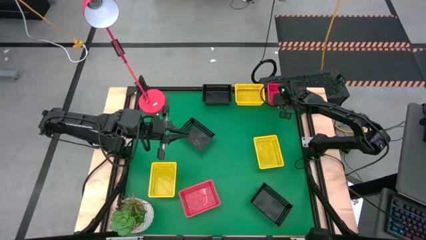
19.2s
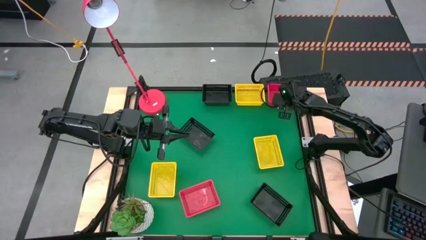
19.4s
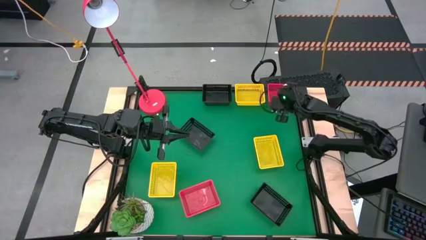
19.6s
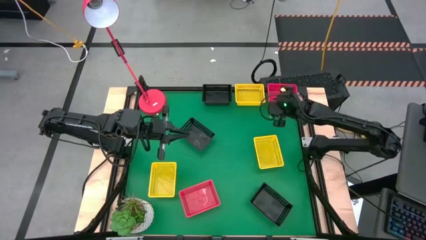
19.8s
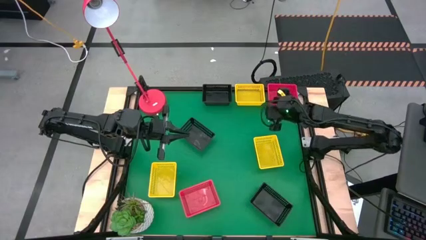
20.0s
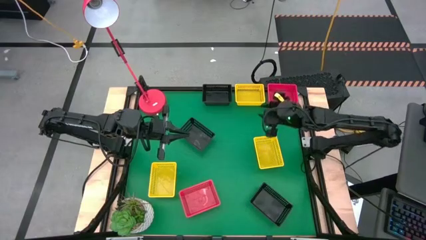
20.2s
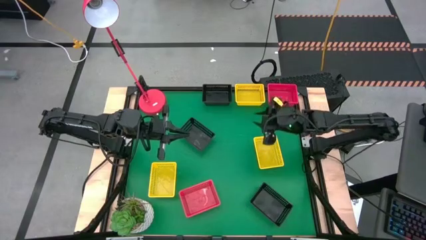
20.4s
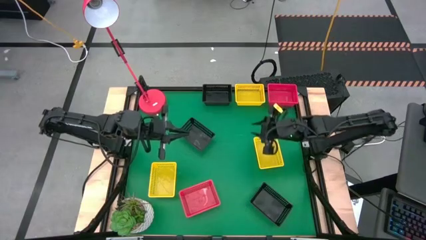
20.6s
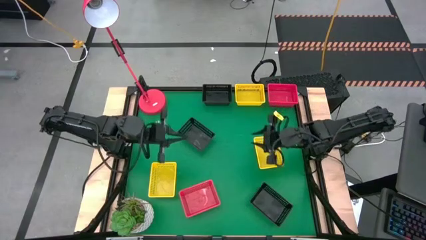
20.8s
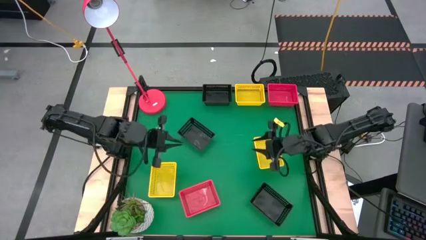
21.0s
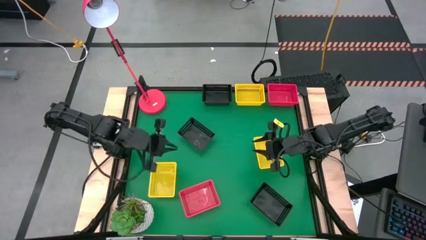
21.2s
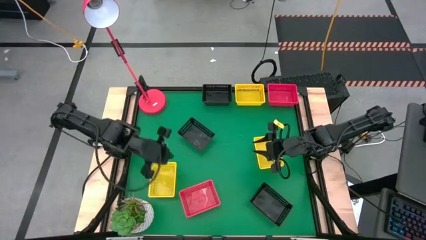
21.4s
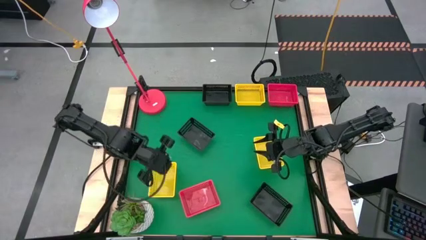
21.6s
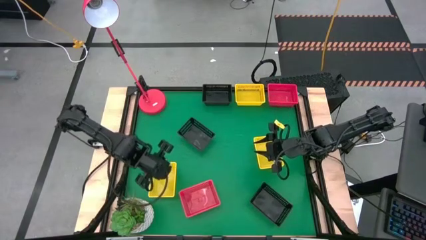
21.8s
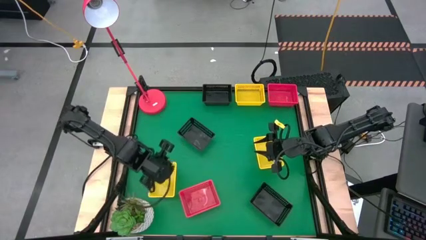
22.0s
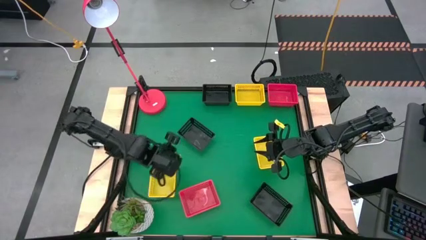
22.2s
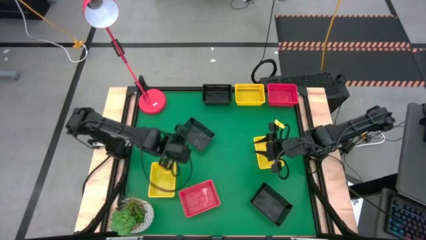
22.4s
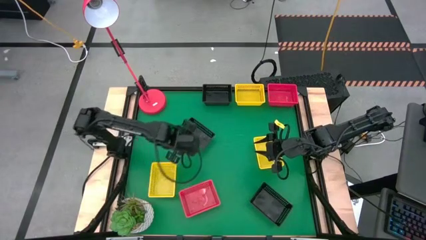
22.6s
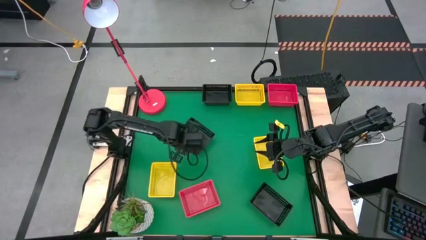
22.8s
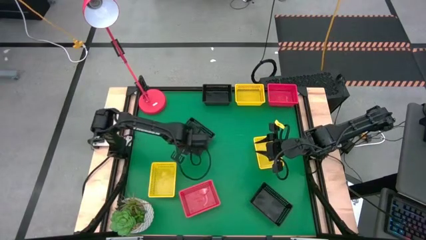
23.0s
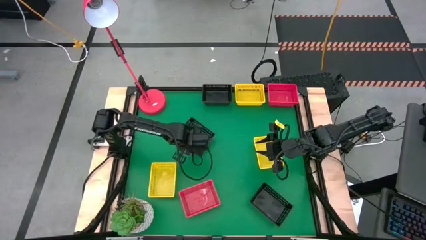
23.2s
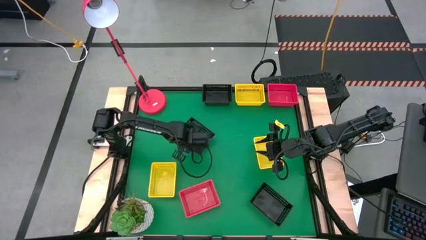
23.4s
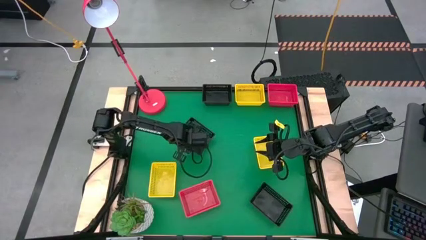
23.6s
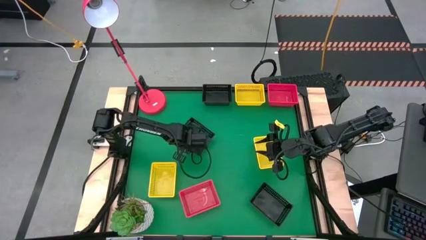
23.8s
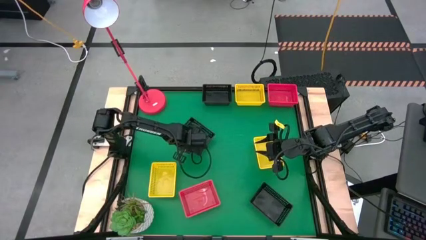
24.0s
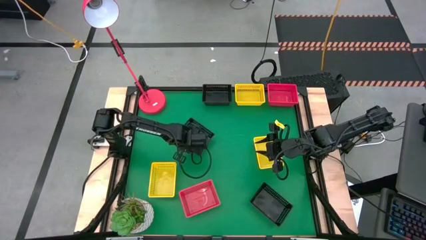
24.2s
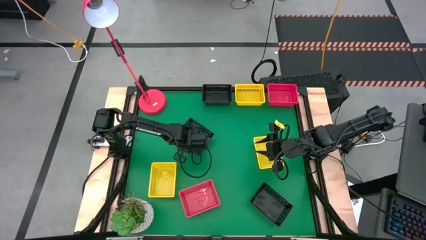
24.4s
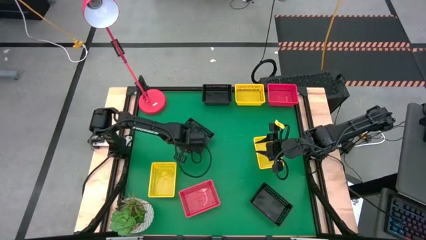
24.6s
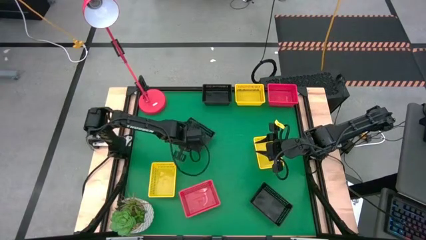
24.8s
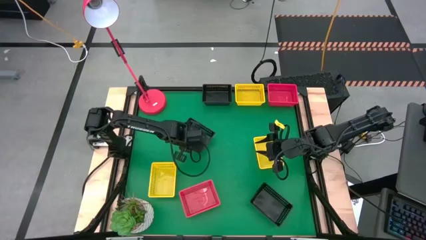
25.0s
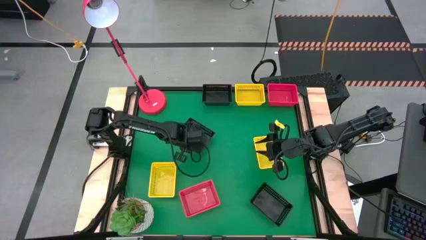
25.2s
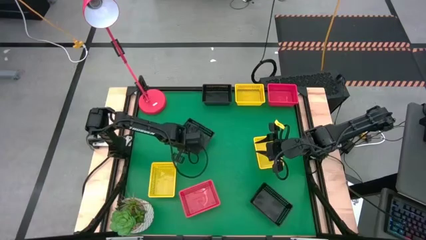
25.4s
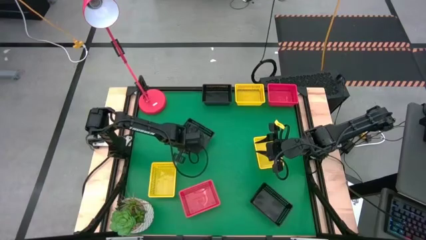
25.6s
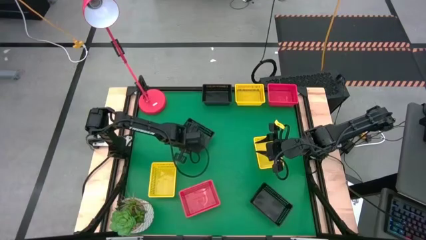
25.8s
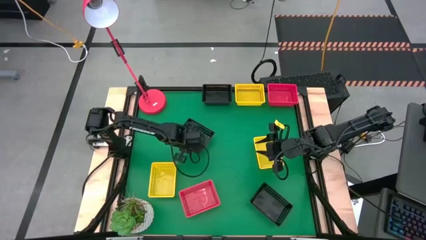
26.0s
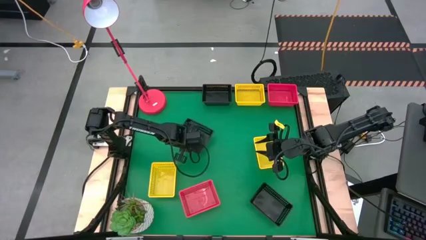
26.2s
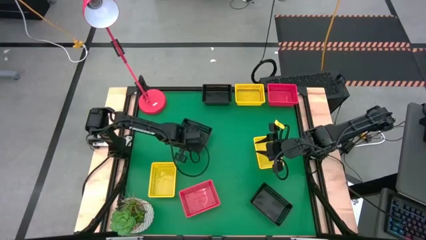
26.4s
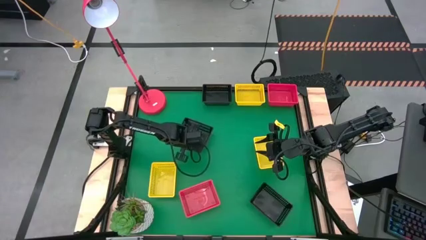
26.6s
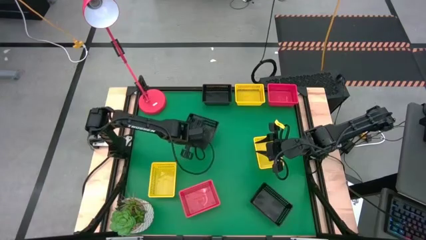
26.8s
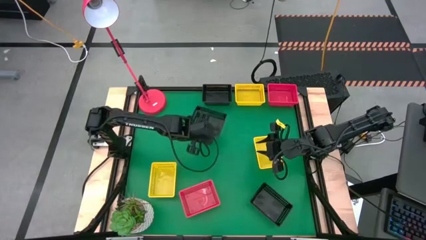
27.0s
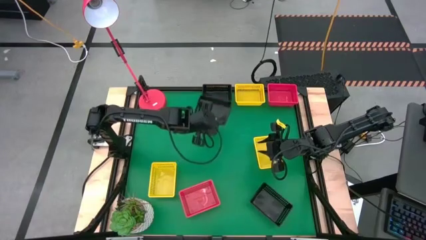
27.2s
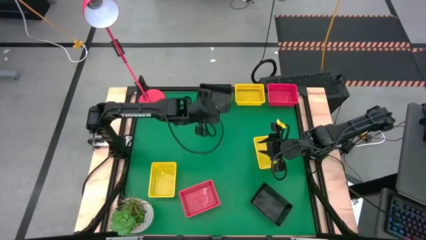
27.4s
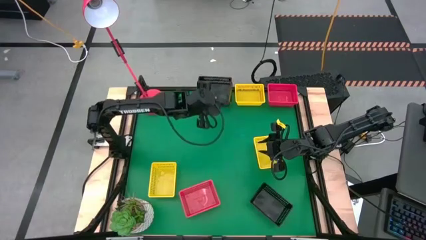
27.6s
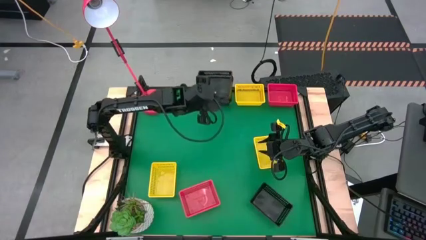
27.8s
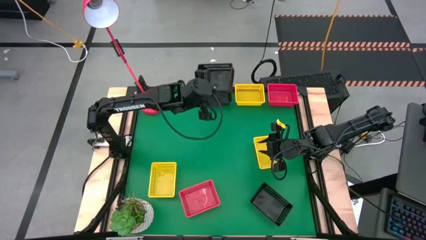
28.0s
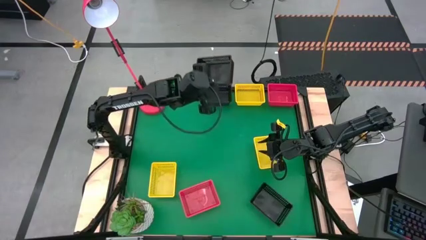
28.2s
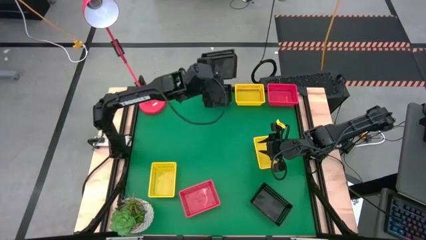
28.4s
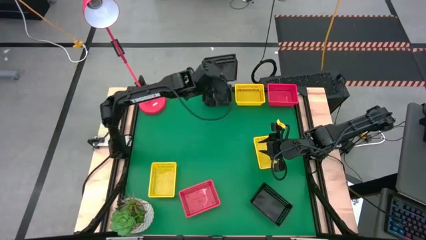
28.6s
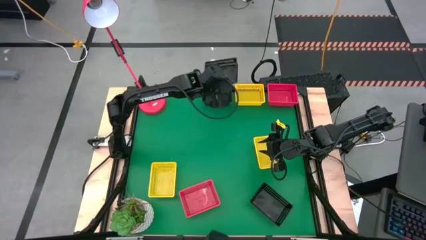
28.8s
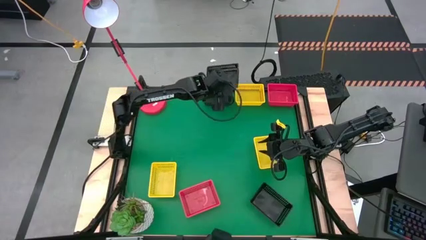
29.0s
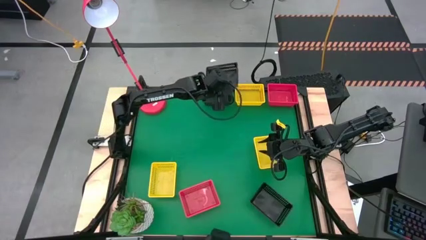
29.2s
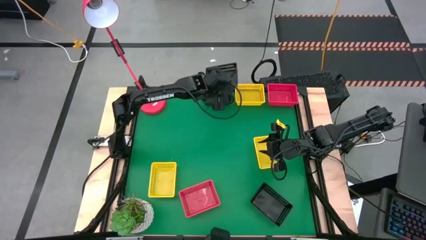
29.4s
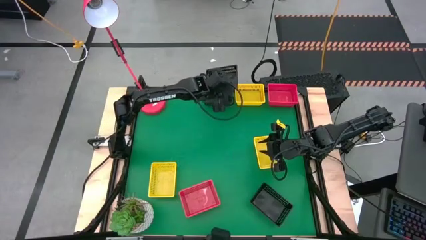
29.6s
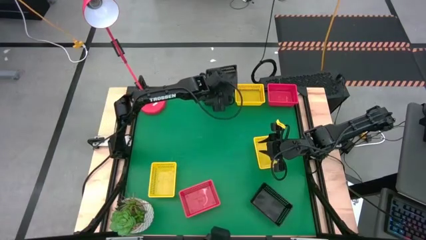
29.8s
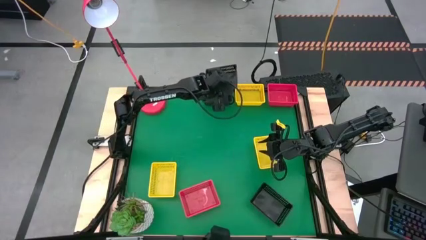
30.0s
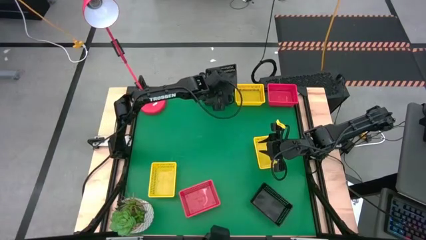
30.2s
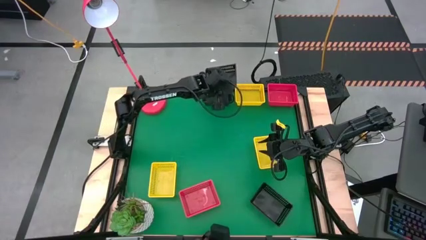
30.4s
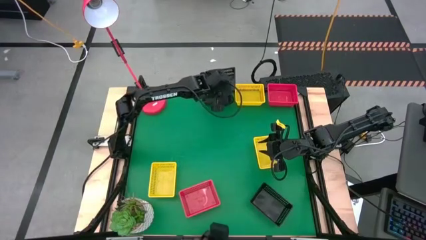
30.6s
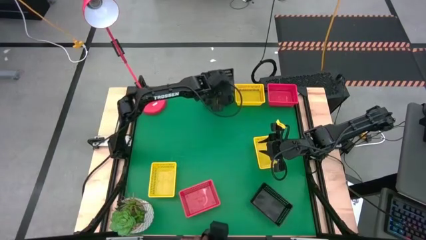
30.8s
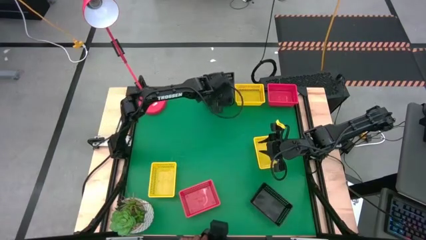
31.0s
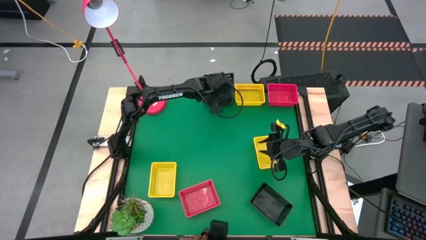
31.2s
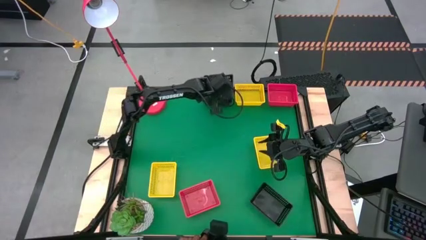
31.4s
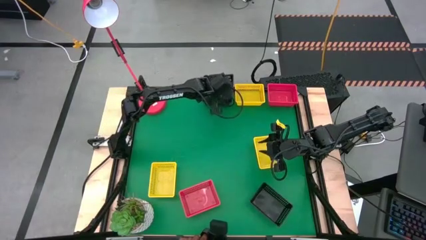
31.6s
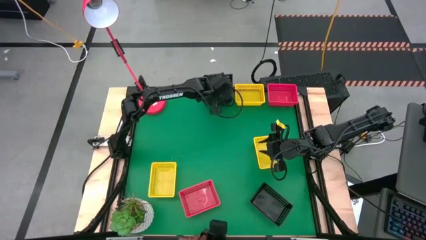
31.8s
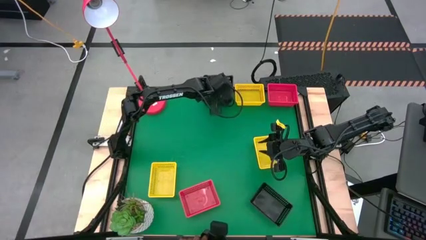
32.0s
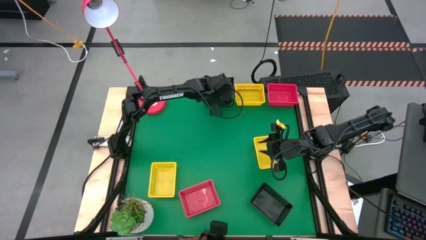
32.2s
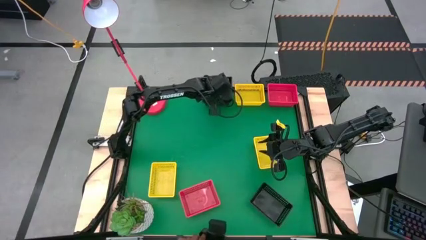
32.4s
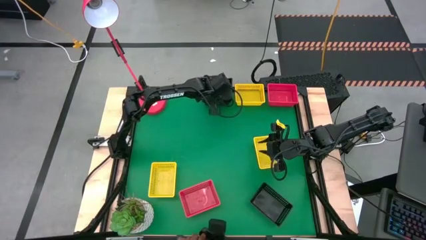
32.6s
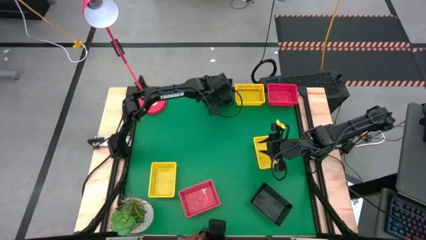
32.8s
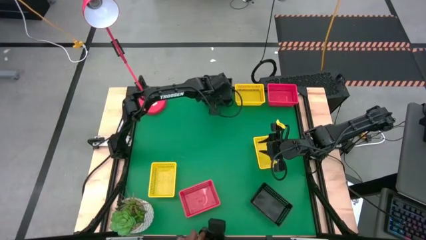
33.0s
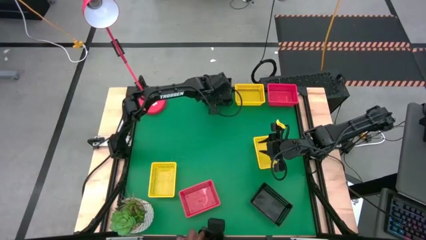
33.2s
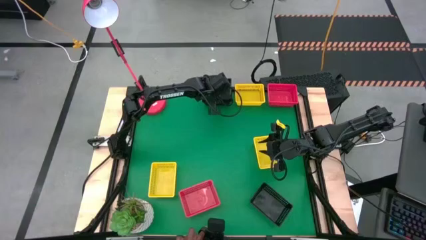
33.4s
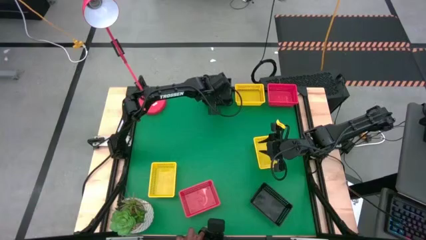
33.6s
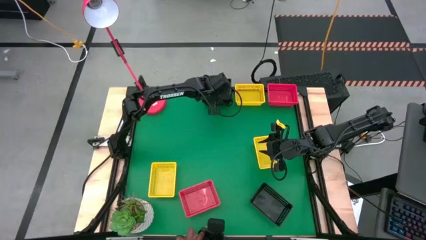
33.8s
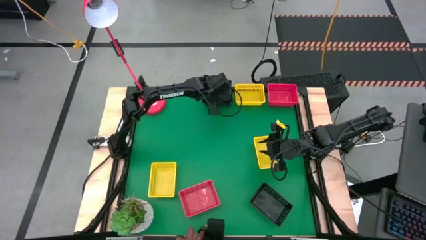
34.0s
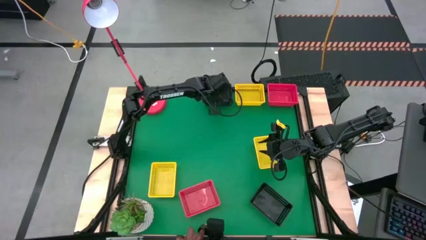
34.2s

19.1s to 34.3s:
Stack the left black bin on the top black bin
